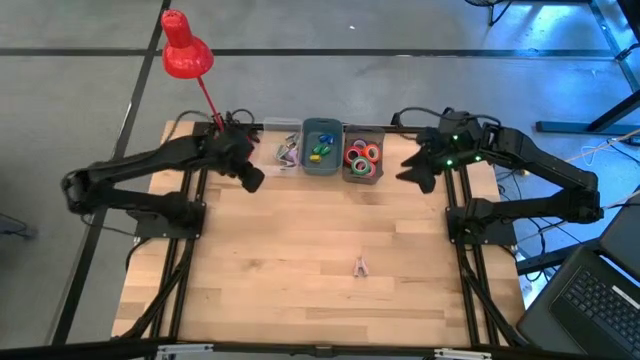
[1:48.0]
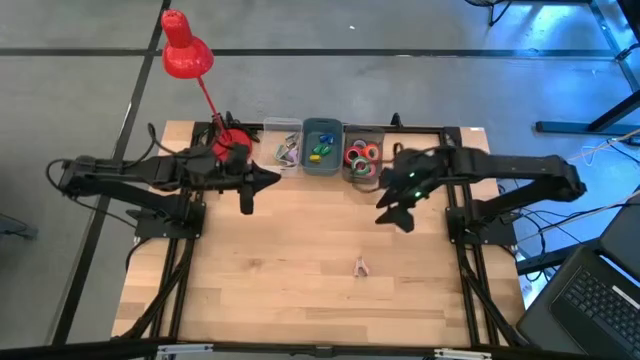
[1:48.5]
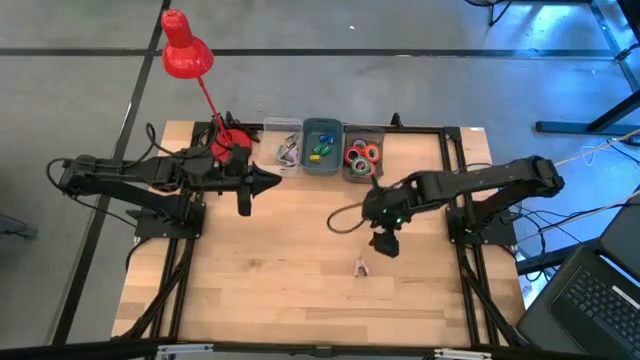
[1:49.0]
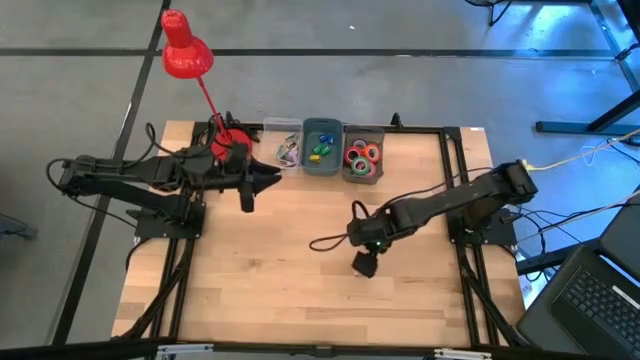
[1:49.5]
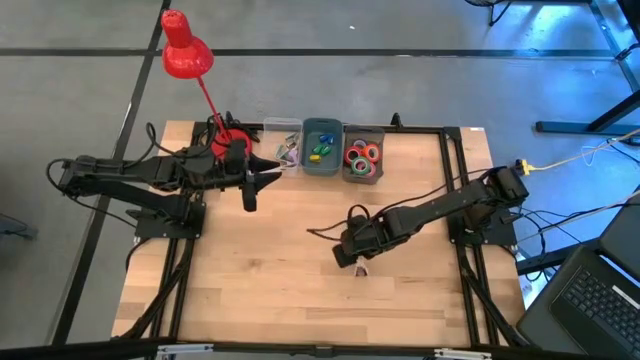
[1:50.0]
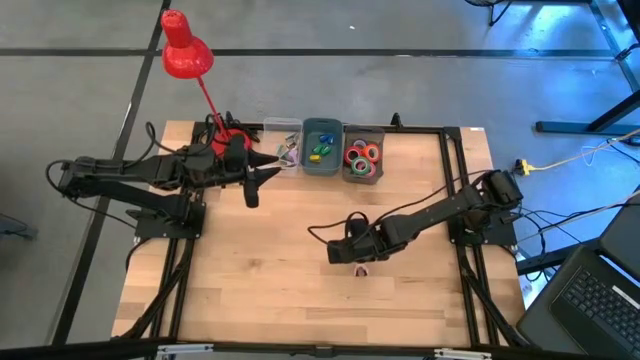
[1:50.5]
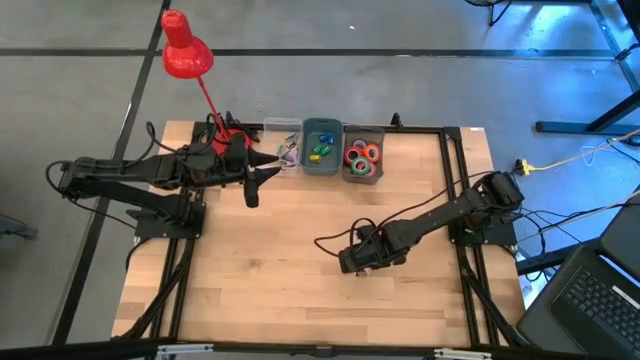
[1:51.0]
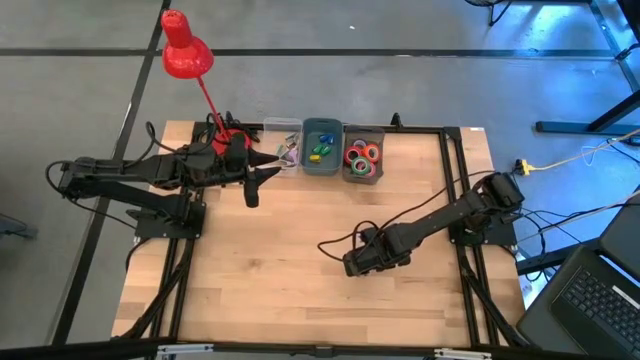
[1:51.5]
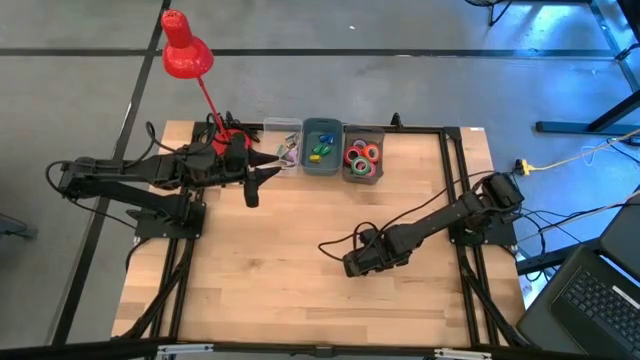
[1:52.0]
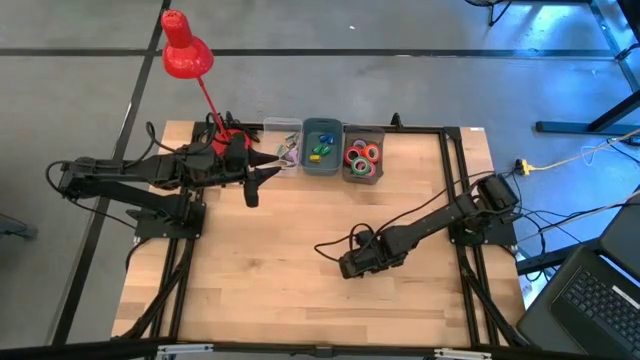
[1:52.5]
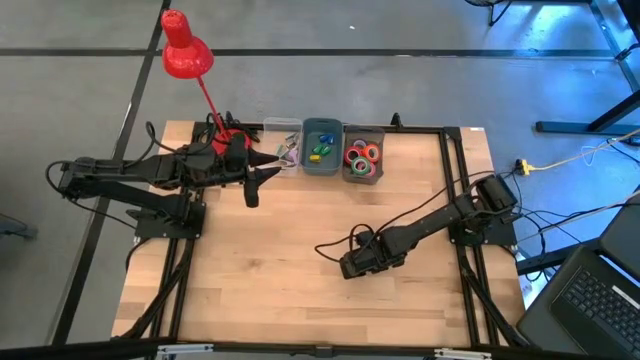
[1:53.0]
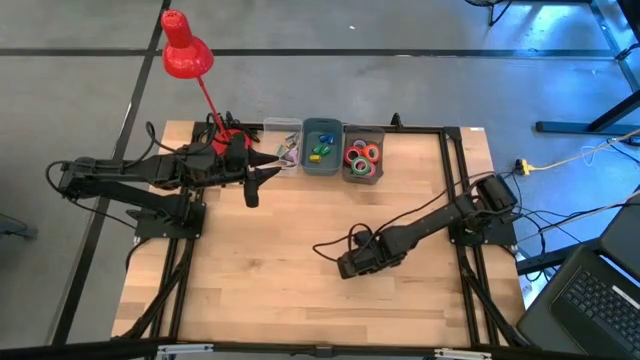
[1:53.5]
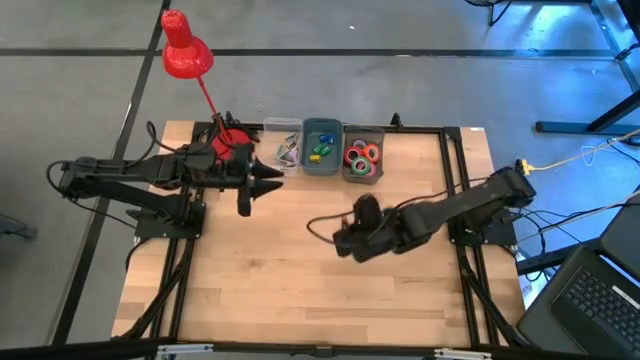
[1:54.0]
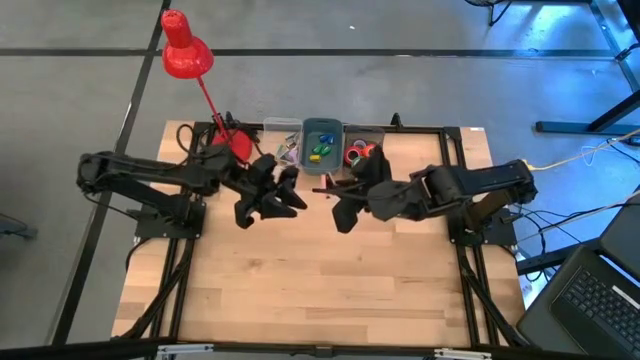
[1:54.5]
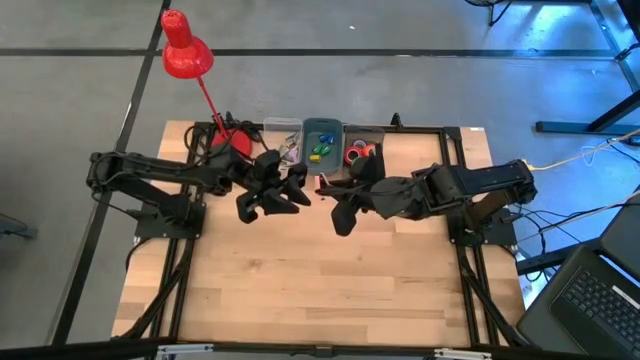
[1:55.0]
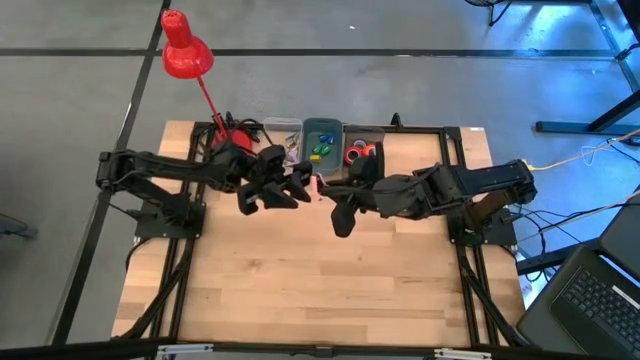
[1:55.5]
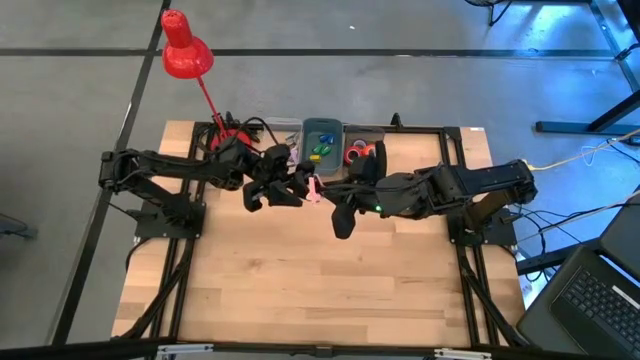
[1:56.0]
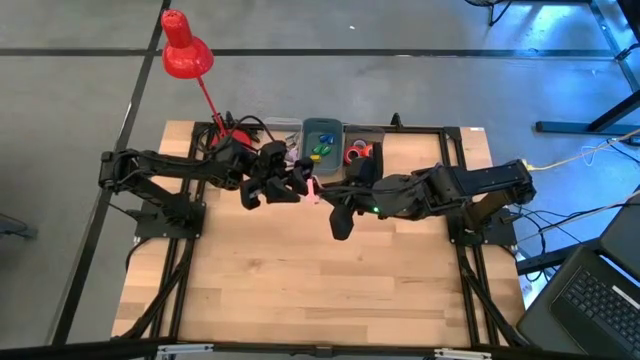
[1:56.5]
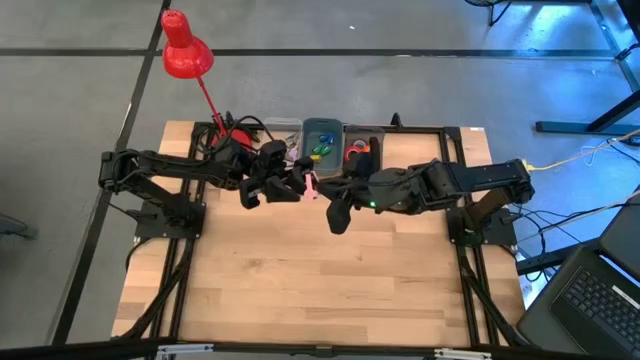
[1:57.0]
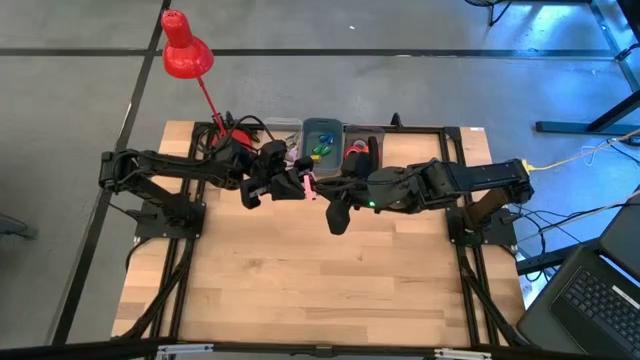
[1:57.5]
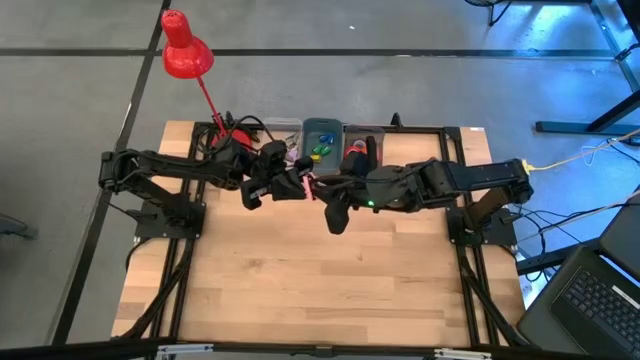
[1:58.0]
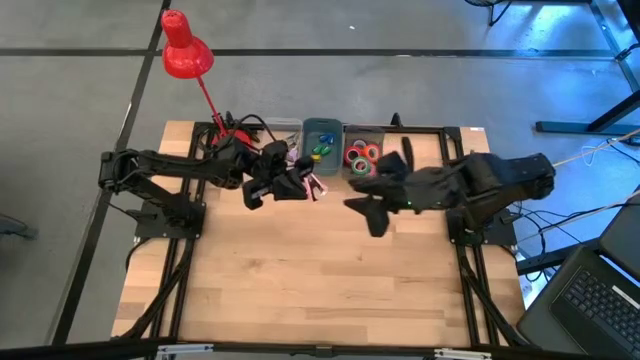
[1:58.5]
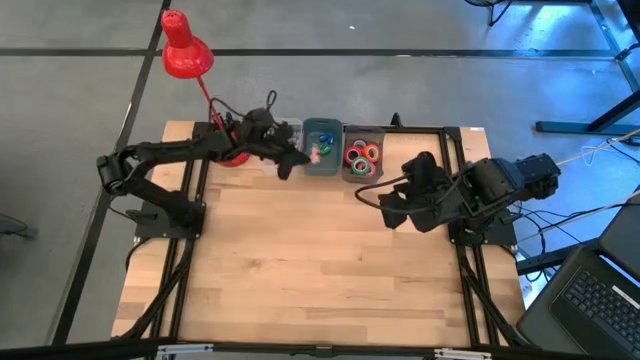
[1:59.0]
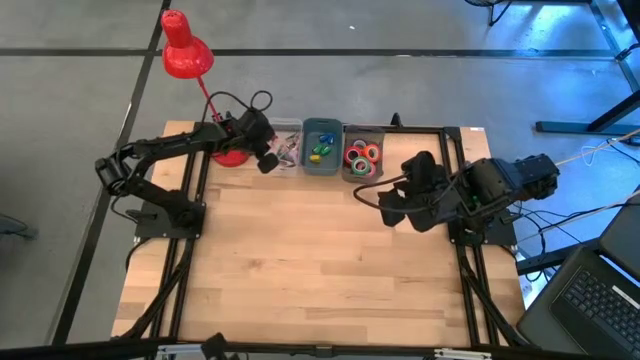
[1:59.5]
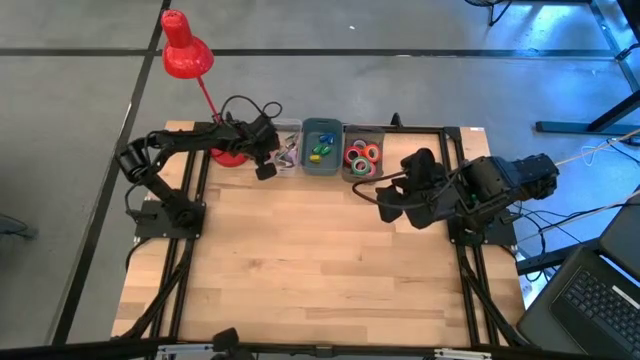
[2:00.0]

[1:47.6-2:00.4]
Task: Pick and place Stapler, Stapler remover, tape
Put the pink staple remover into the transparent bin

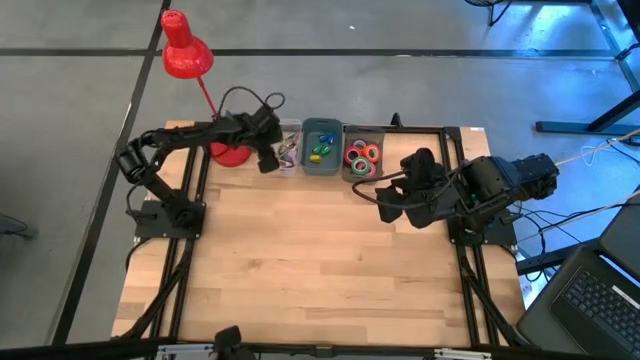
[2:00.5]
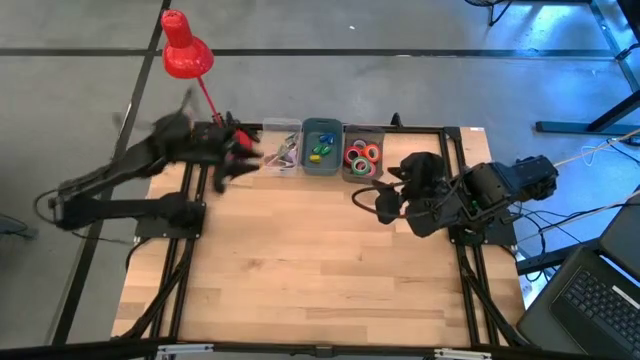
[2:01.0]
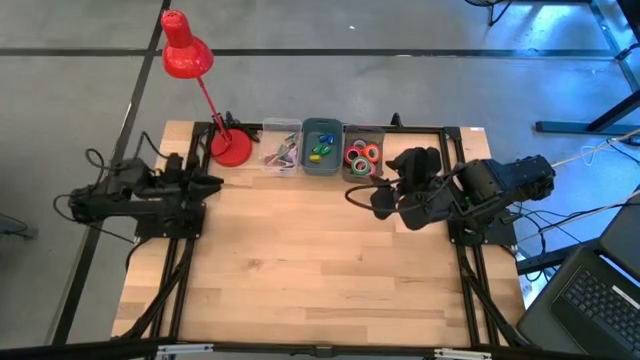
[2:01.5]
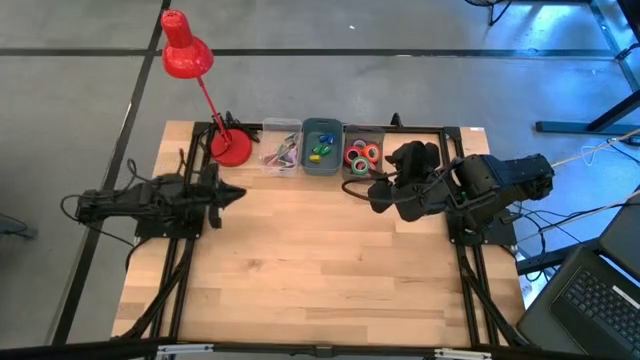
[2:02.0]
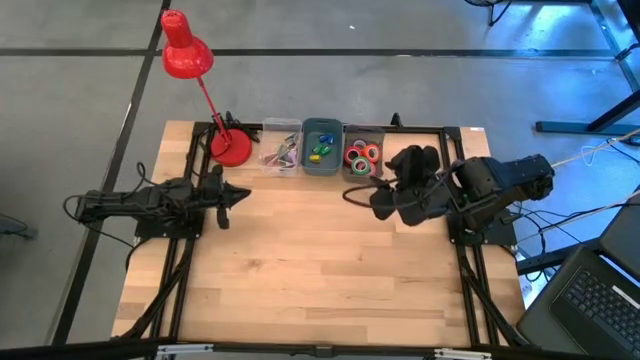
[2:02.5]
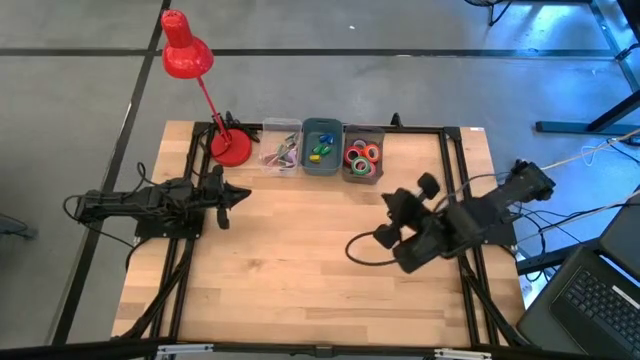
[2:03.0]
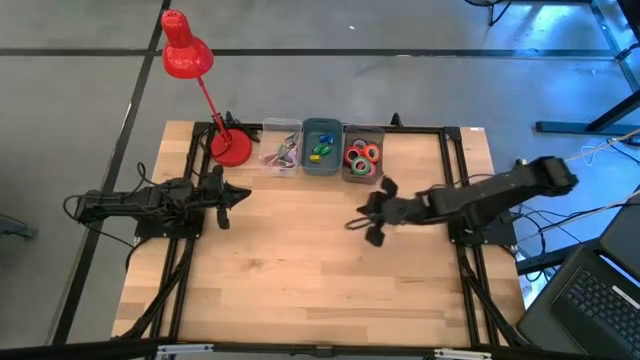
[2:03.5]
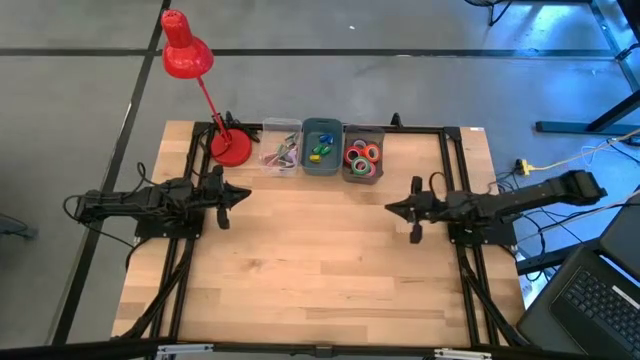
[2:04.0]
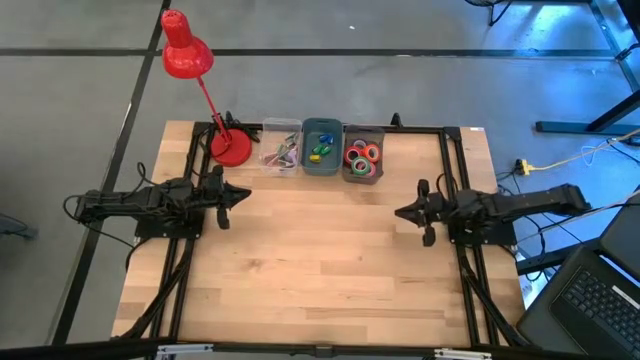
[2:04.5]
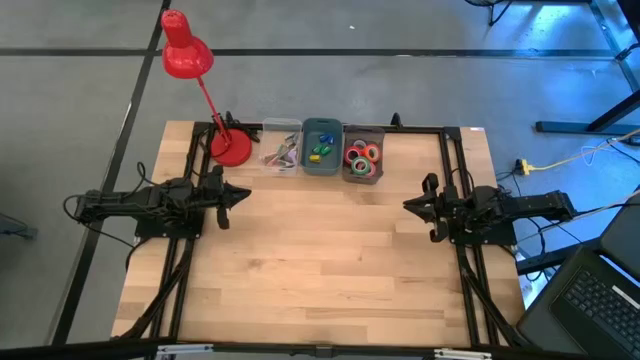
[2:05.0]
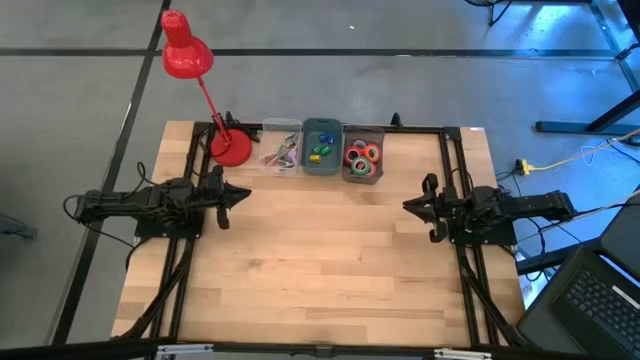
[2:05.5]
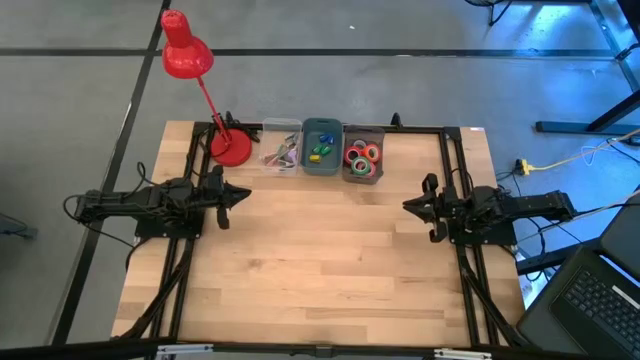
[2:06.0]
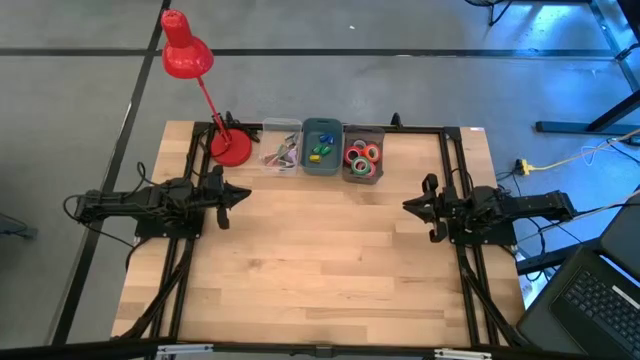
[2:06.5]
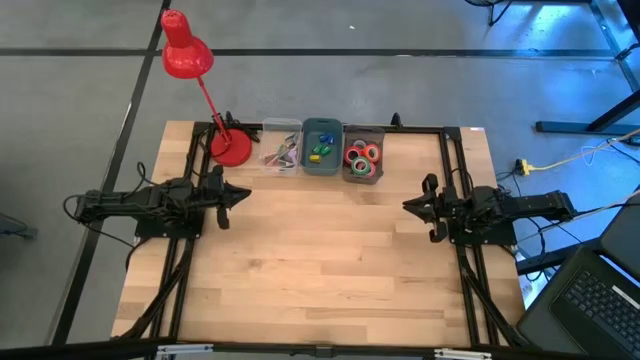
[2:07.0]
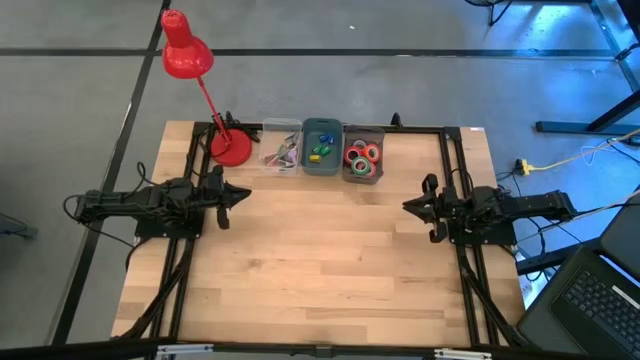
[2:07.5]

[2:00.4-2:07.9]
Return to Home Position

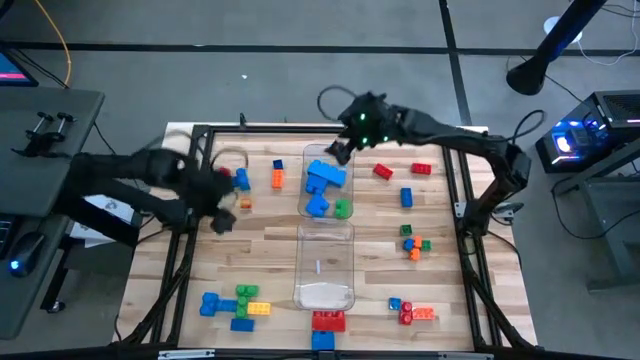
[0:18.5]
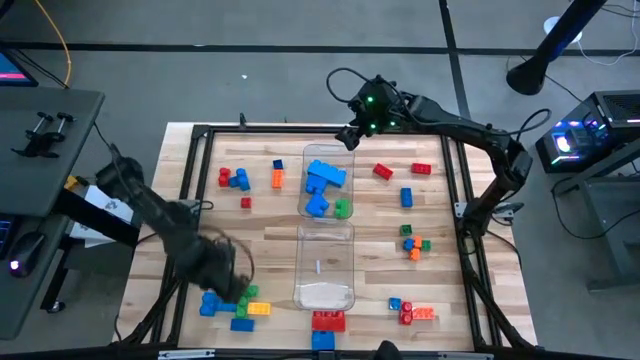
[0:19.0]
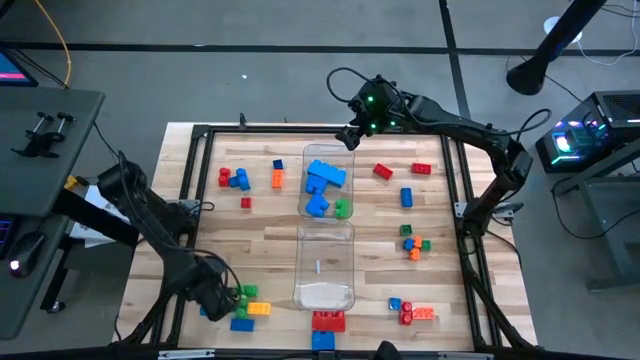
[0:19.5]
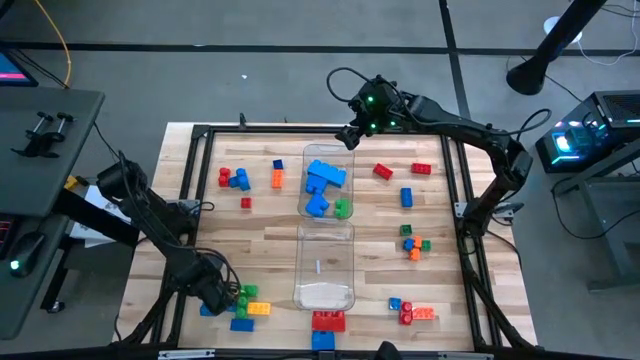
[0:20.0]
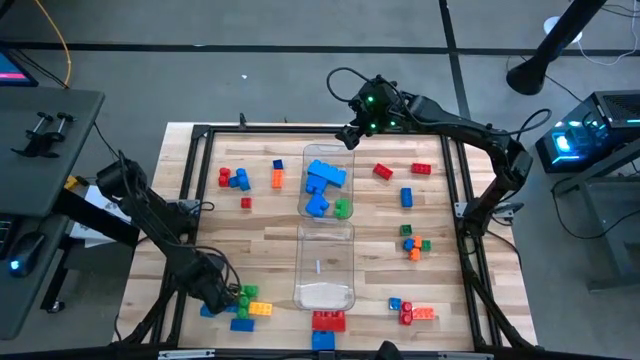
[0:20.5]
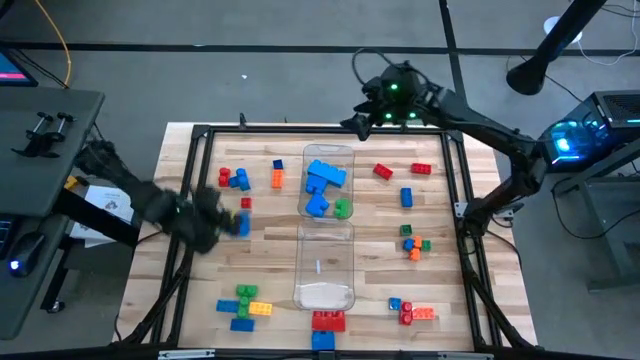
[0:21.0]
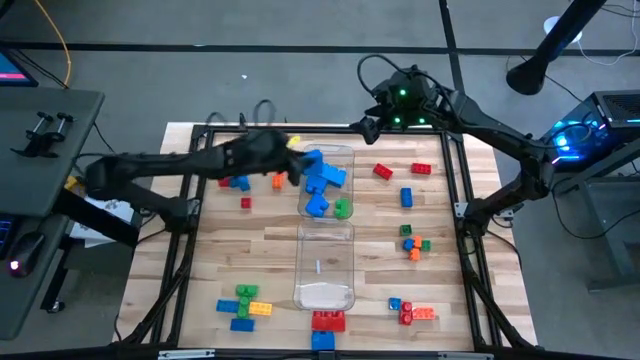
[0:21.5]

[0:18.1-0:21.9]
Task: Sort blocks by size
Put the large blue game piece in the top transparent bin
